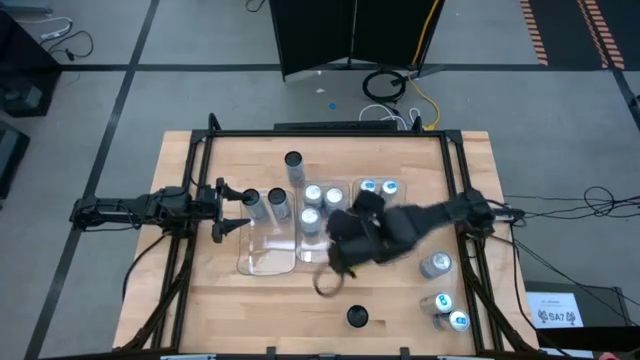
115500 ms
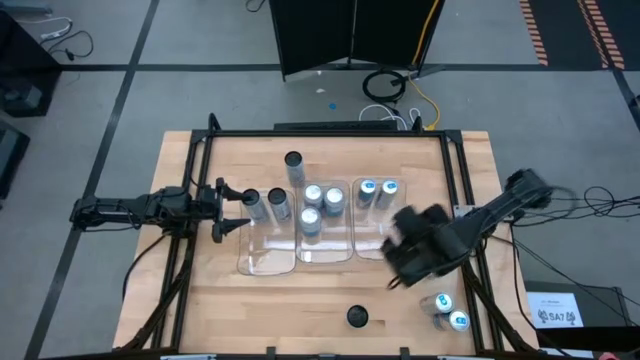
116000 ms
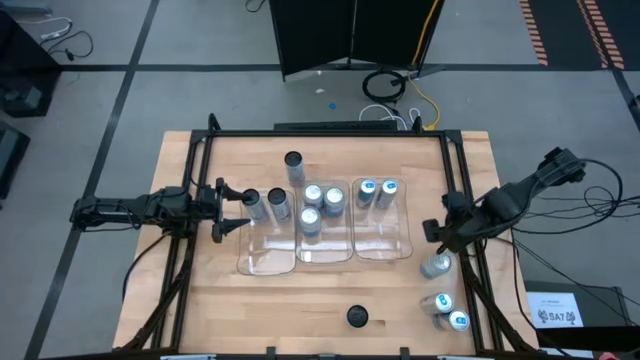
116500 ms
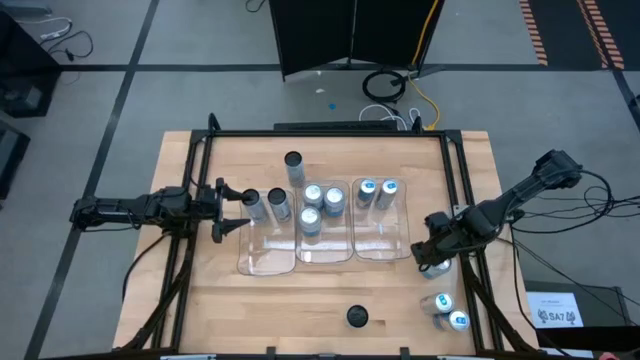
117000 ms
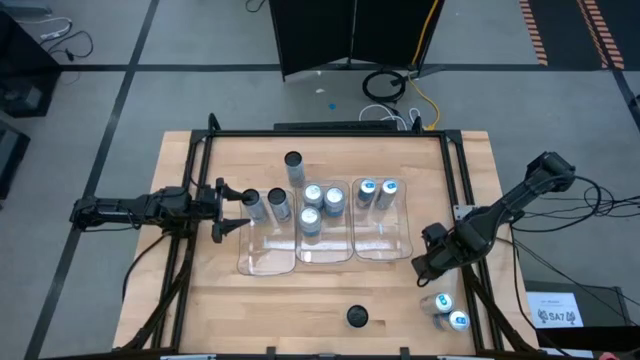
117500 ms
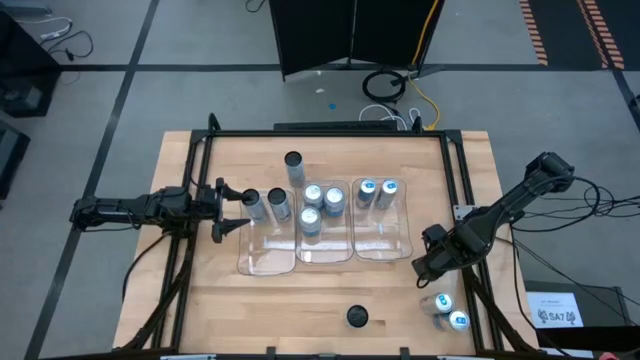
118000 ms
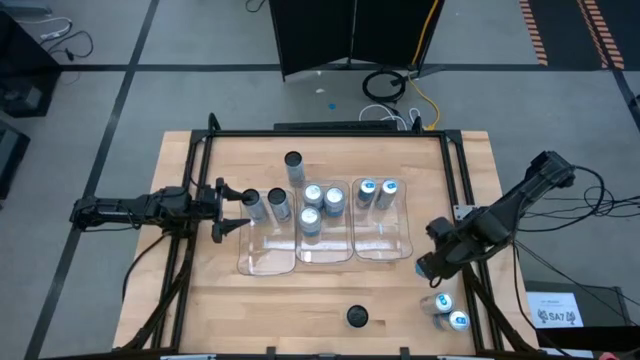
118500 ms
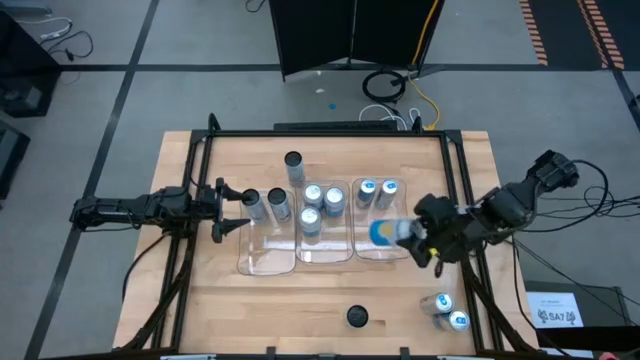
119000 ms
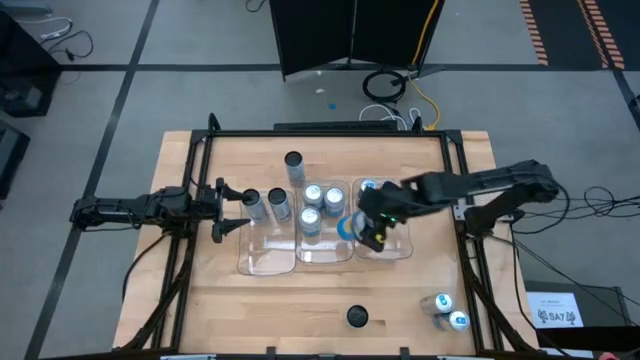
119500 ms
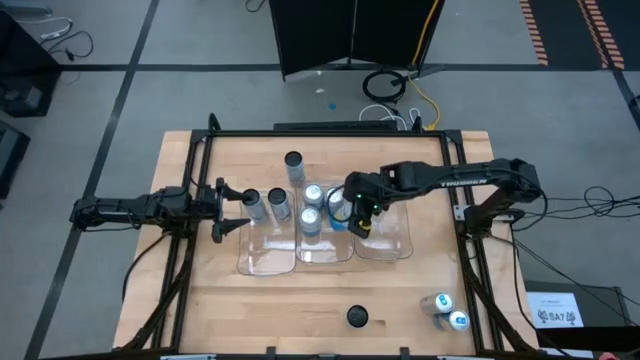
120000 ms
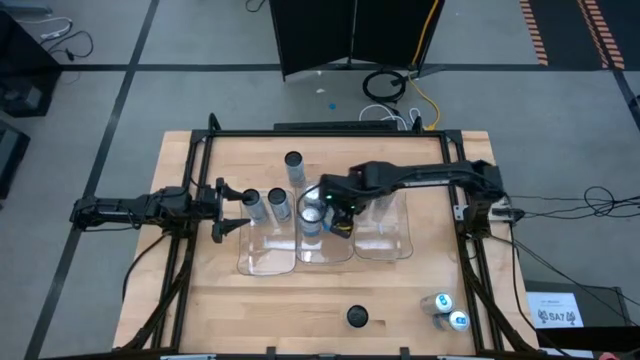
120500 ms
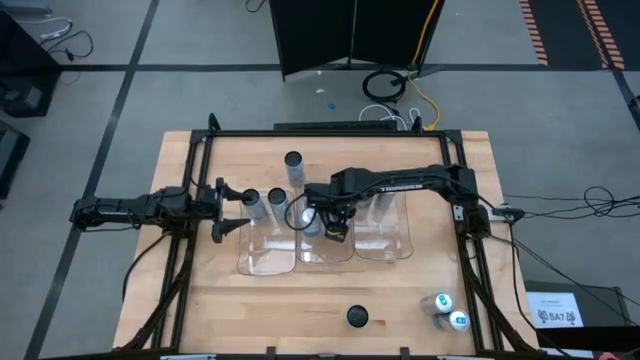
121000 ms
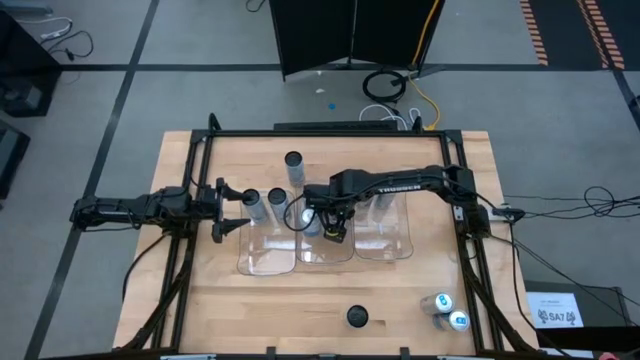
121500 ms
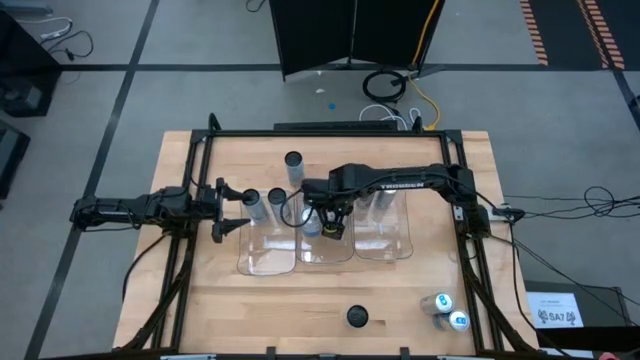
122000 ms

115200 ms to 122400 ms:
Task: Sort soda cans
Put the blue soda can into the middle transparent bin

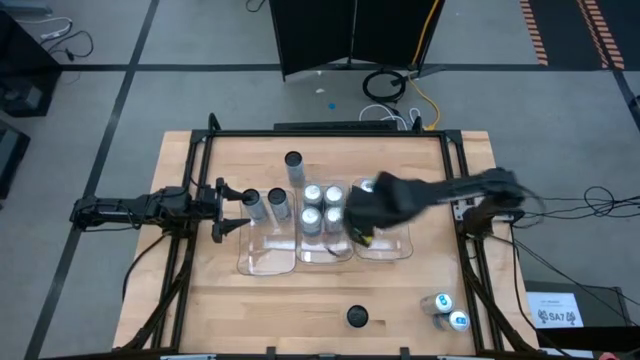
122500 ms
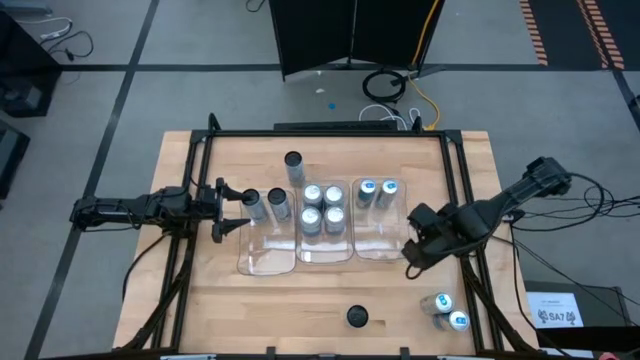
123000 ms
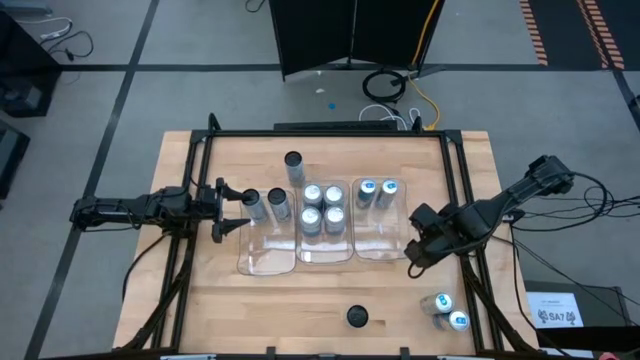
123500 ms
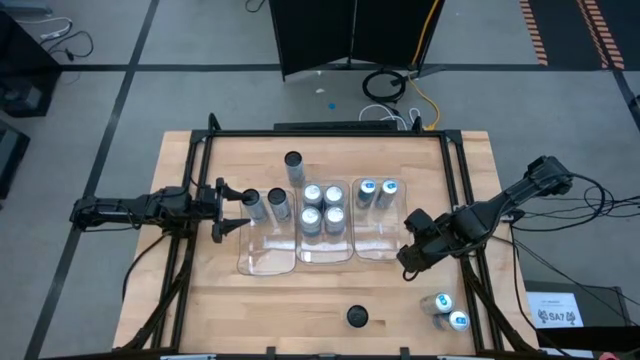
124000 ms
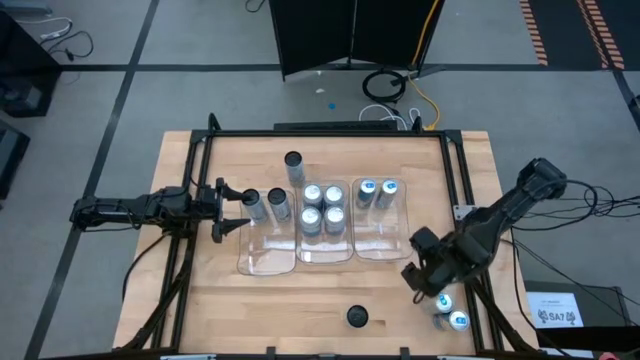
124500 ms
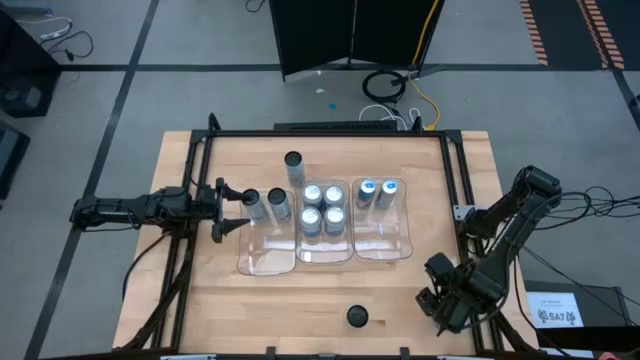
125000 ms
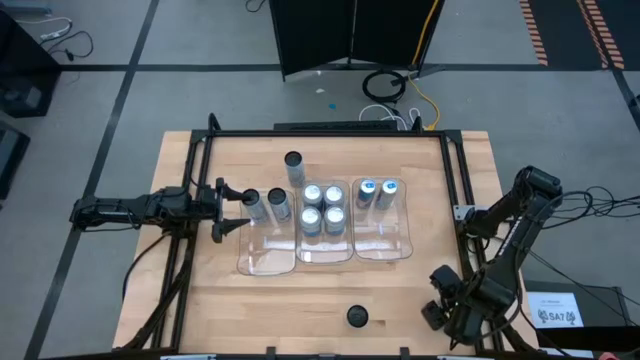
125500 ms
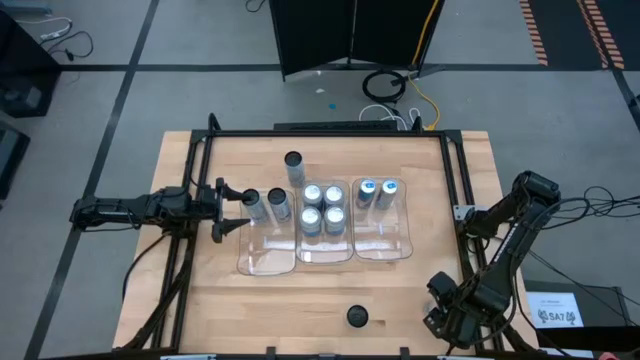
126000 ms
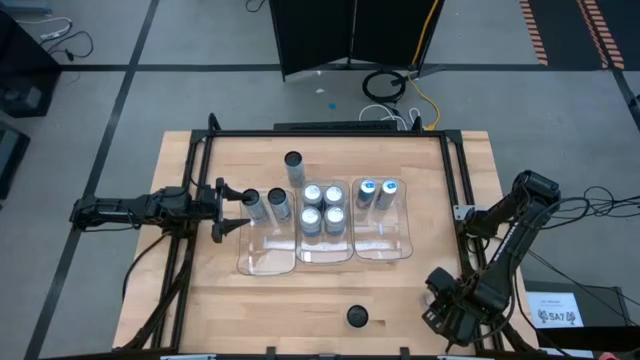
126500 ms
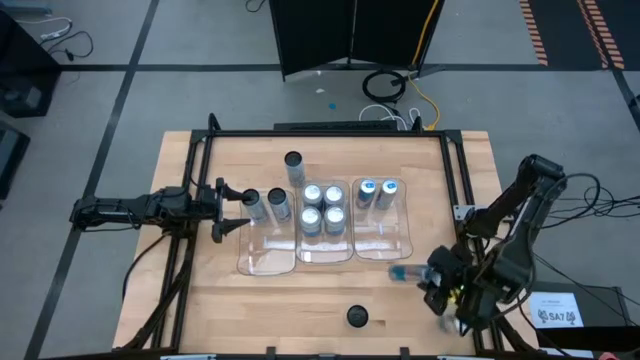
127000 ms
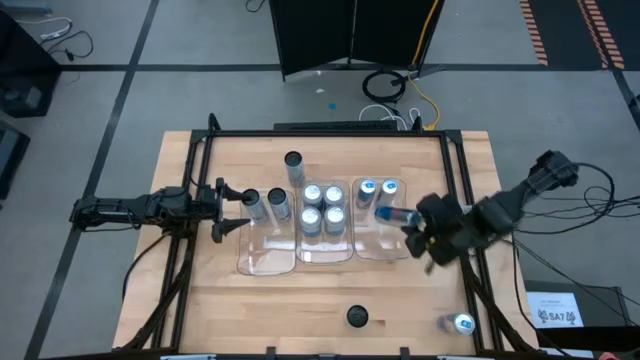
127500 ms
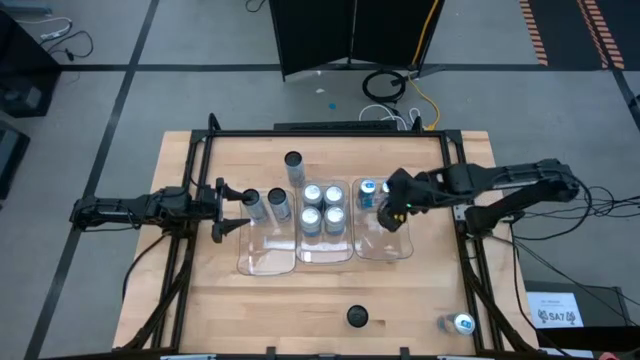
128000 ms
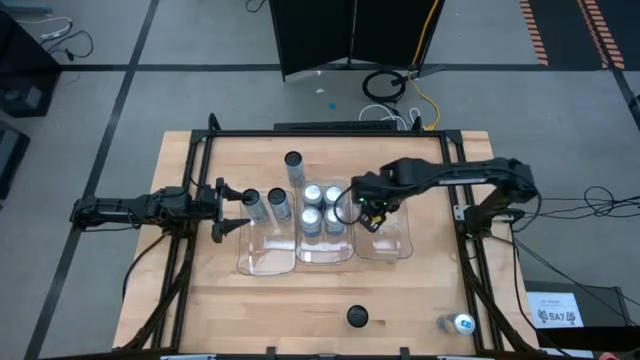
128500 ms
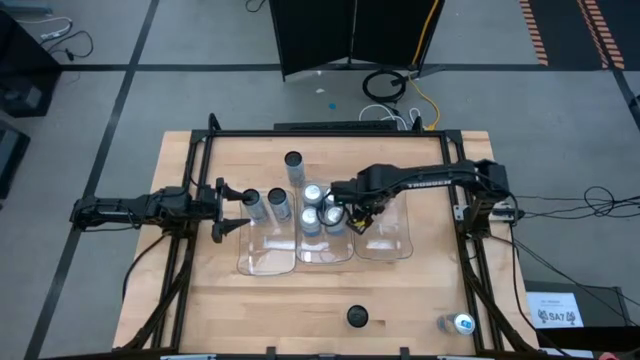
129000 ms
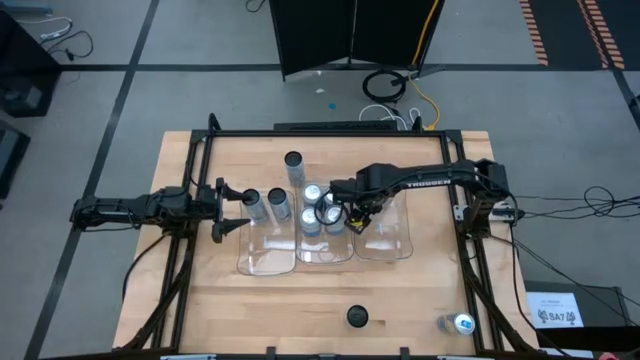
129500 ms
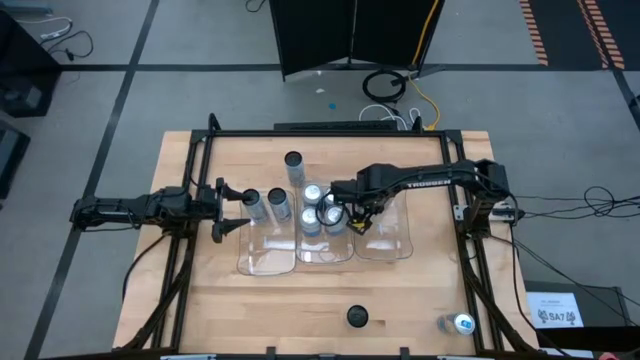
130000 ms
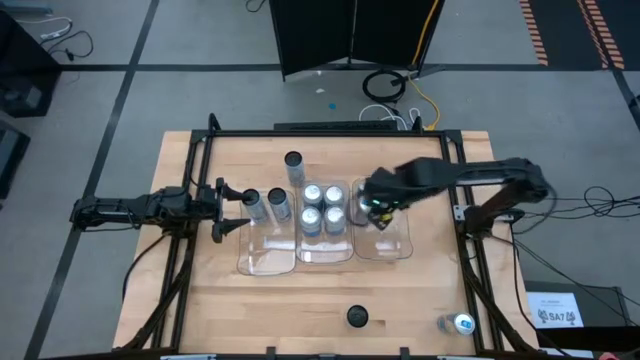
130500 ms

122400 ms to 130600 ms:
Put the top right silver soda can into the right transparent bin

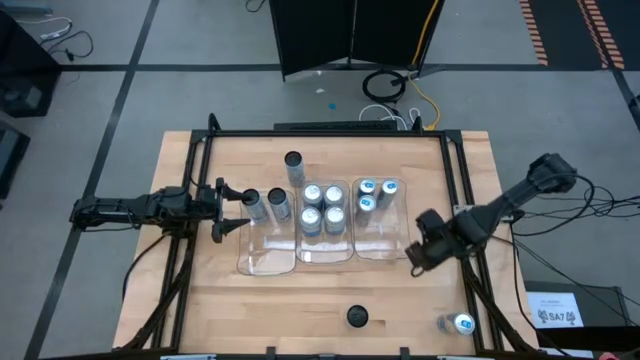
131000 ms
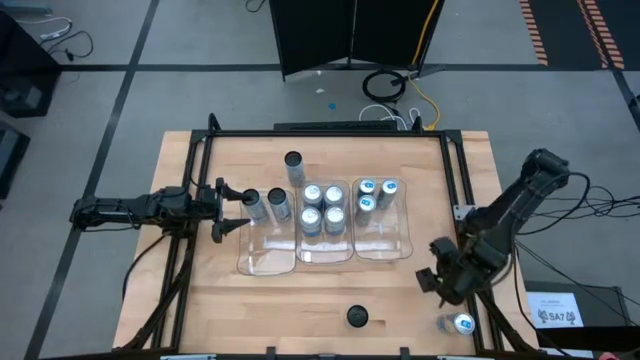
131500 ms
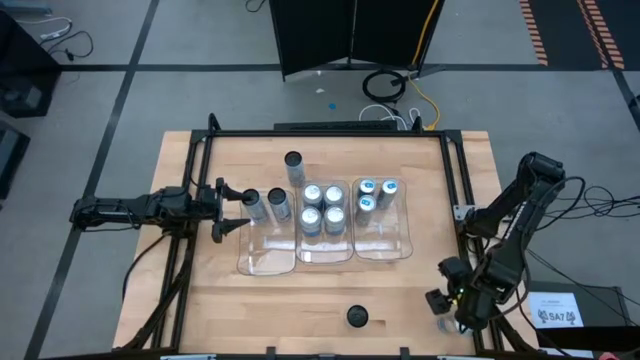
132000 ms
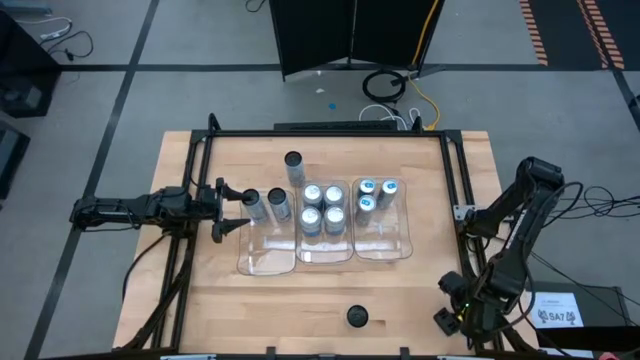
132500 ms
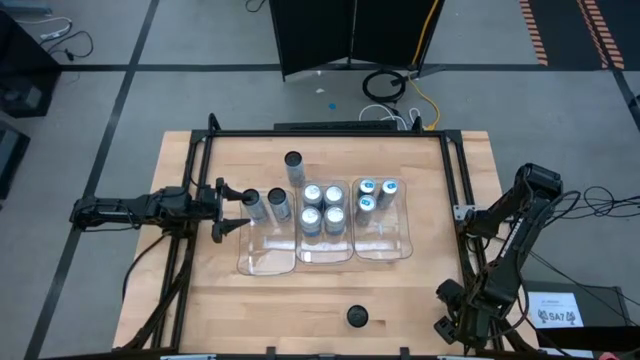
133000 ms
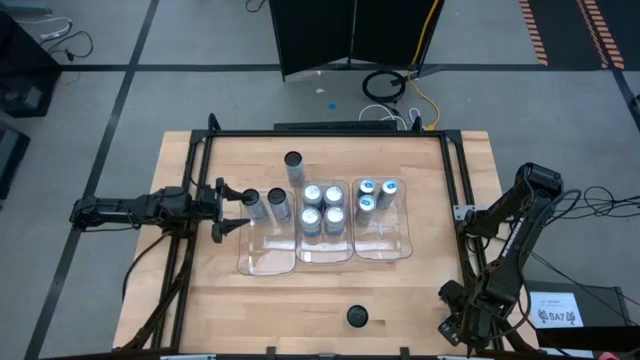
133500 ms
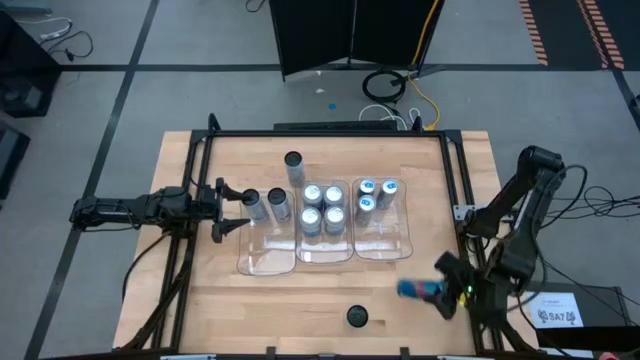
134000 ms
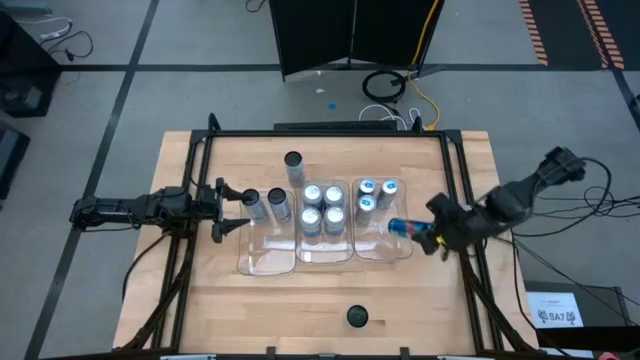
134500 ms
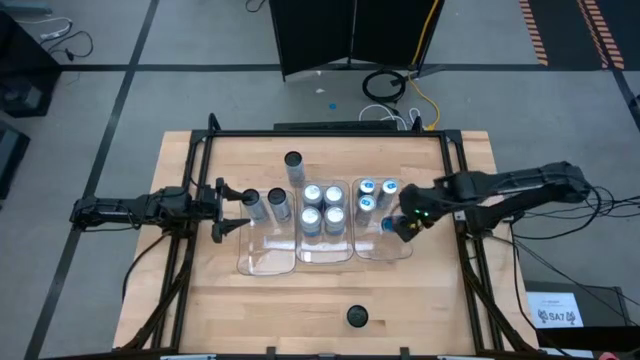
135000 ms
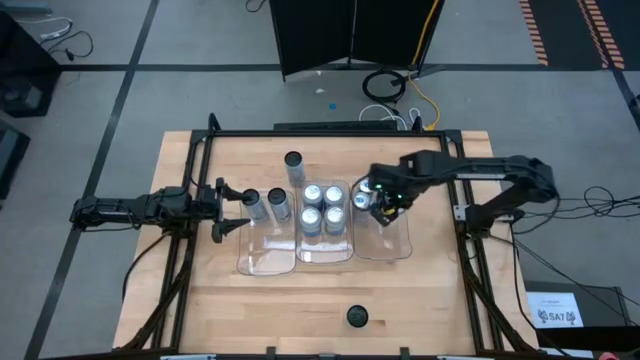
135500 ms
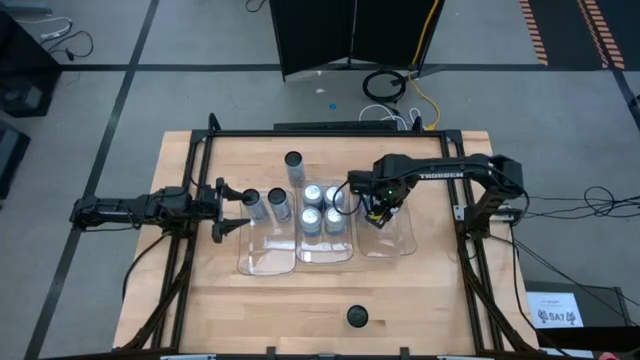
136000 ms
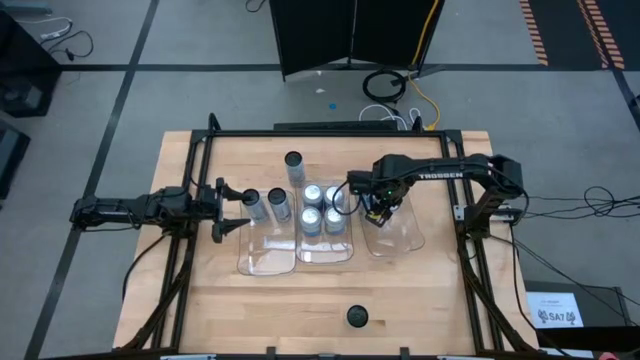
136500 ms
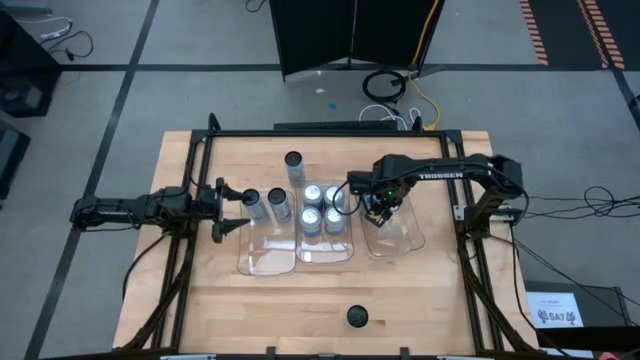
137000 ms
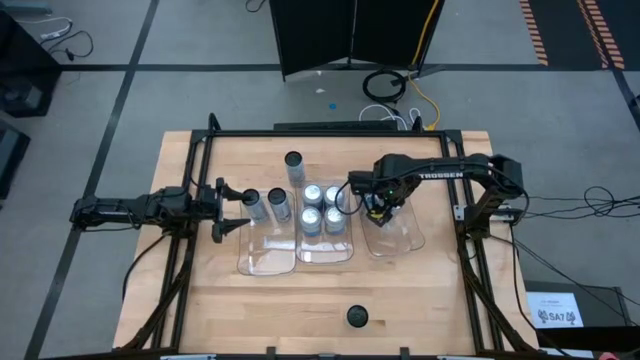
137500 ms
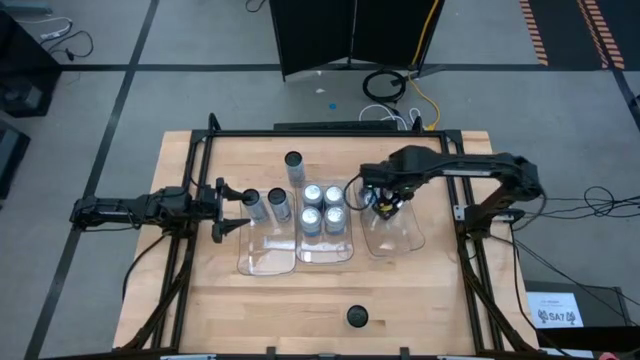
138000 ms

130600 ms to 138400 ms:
Put the silver soda can into the right transparent bin
